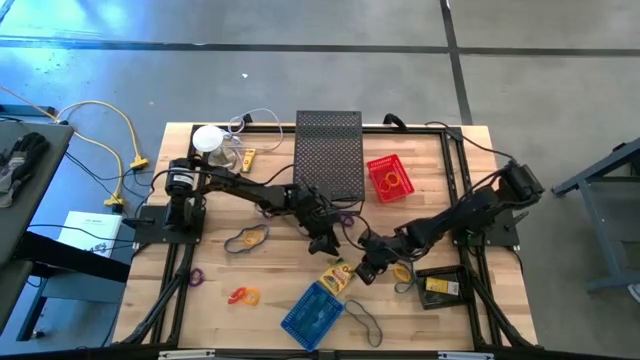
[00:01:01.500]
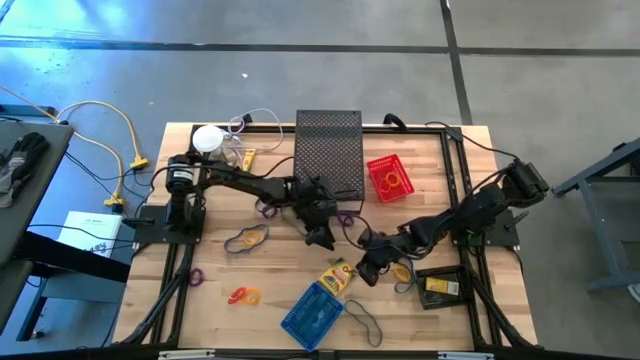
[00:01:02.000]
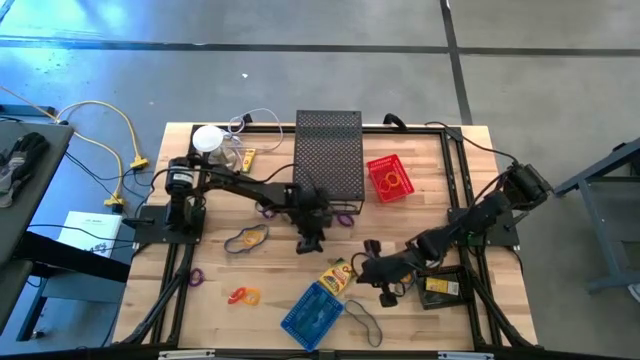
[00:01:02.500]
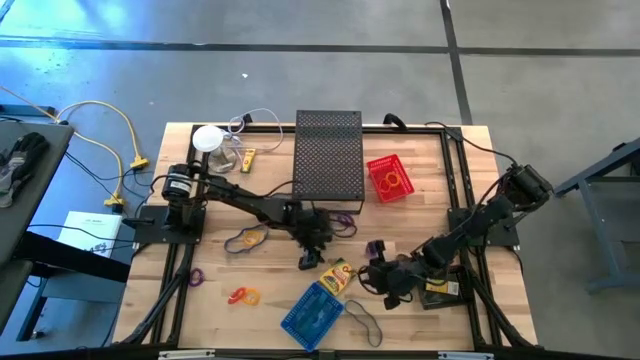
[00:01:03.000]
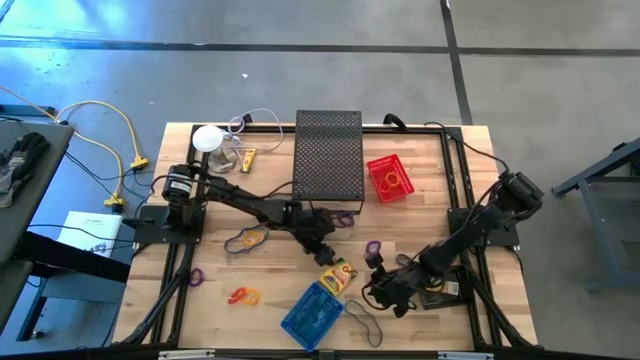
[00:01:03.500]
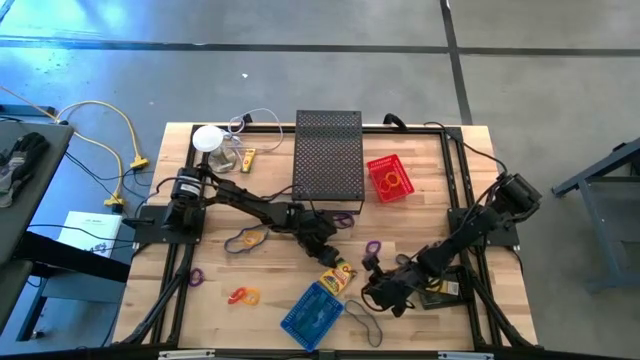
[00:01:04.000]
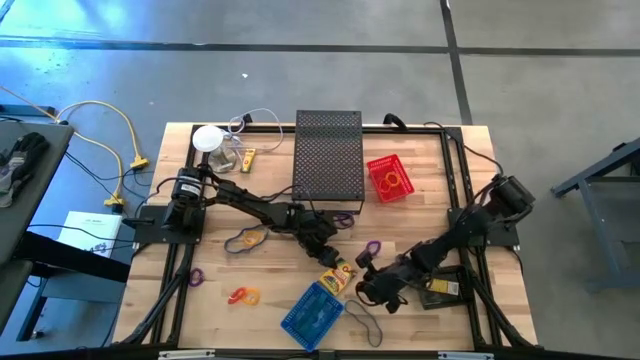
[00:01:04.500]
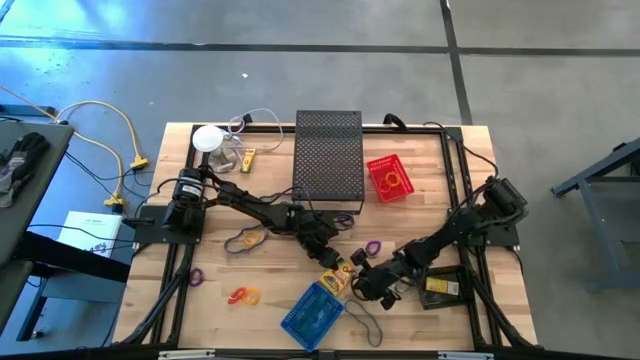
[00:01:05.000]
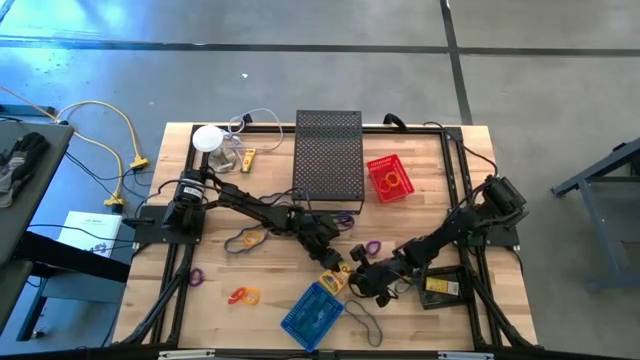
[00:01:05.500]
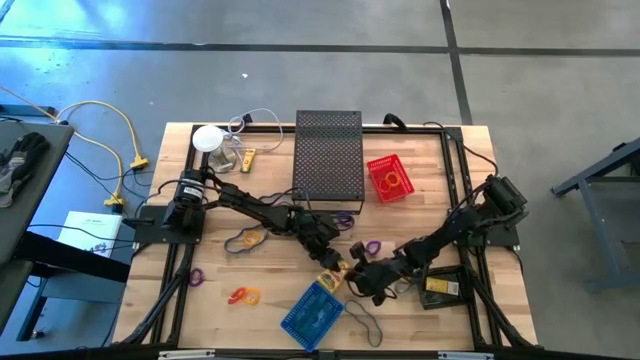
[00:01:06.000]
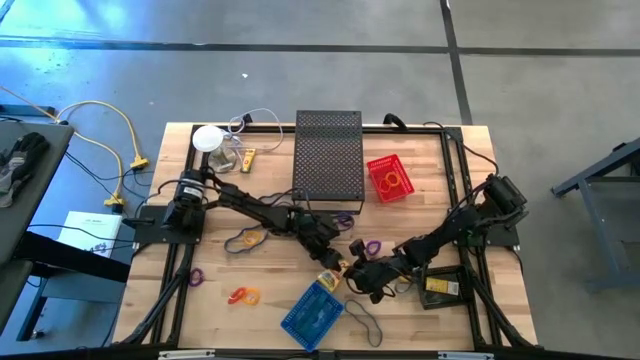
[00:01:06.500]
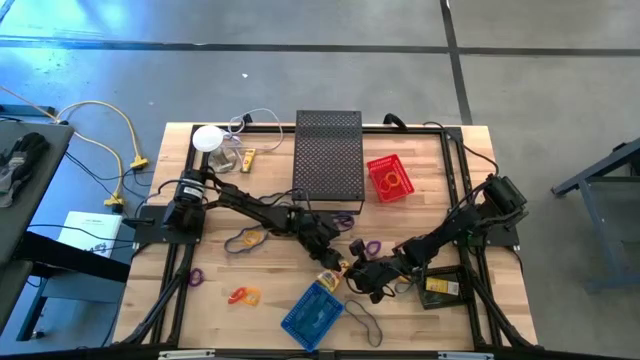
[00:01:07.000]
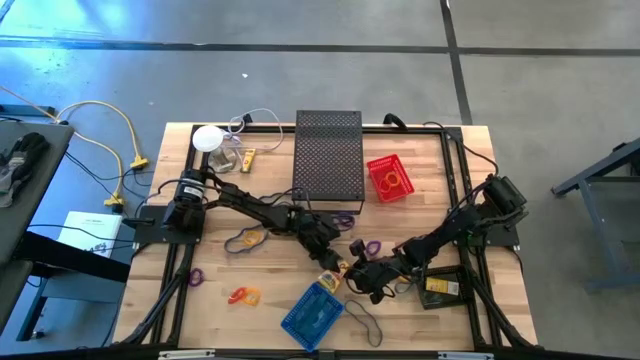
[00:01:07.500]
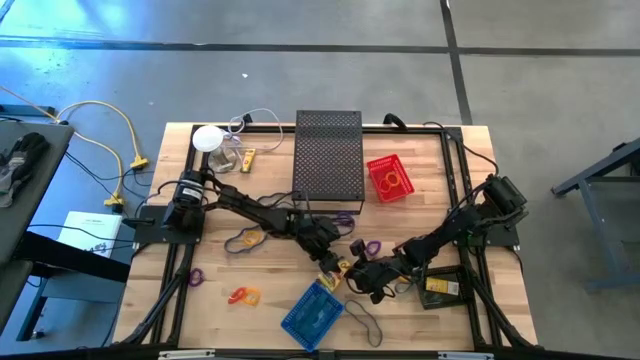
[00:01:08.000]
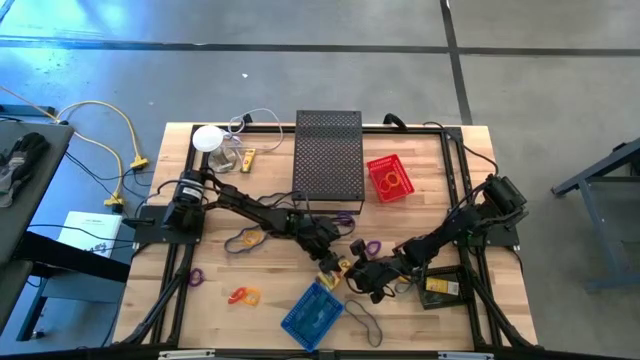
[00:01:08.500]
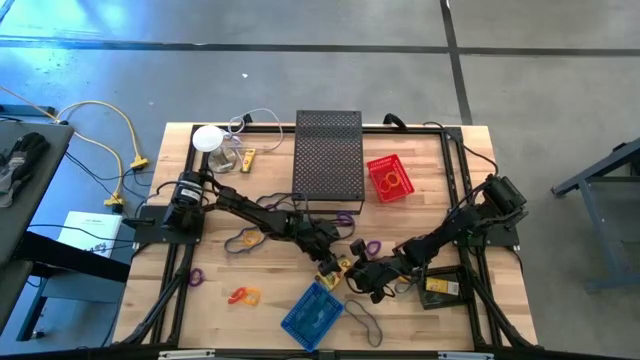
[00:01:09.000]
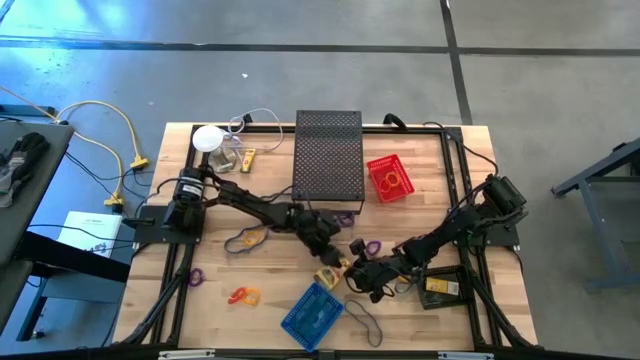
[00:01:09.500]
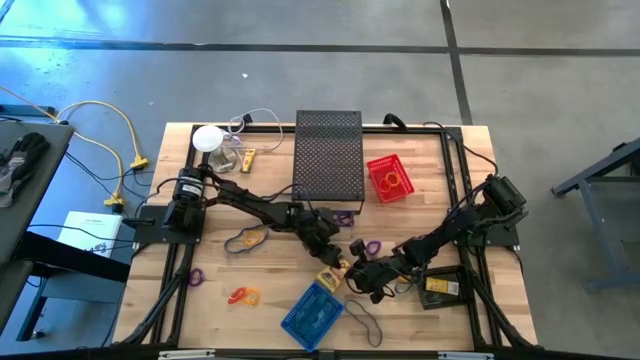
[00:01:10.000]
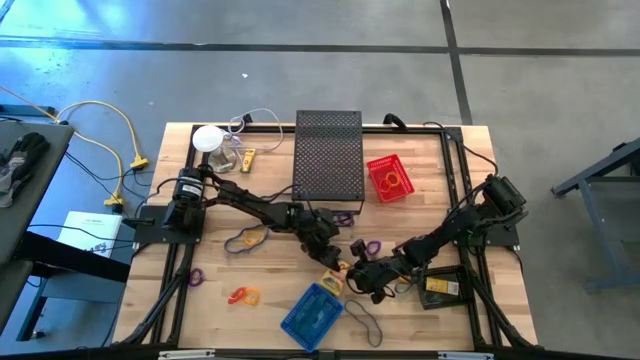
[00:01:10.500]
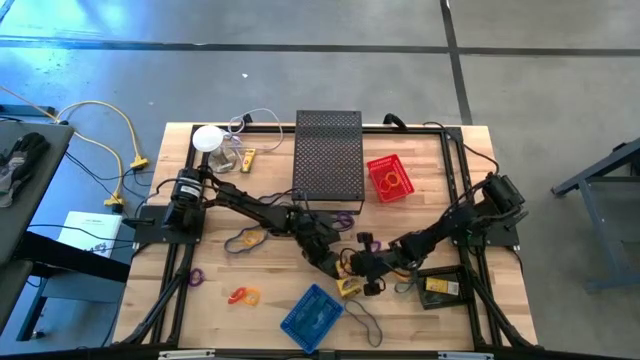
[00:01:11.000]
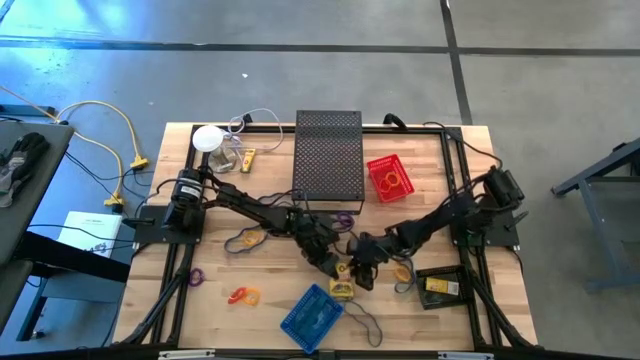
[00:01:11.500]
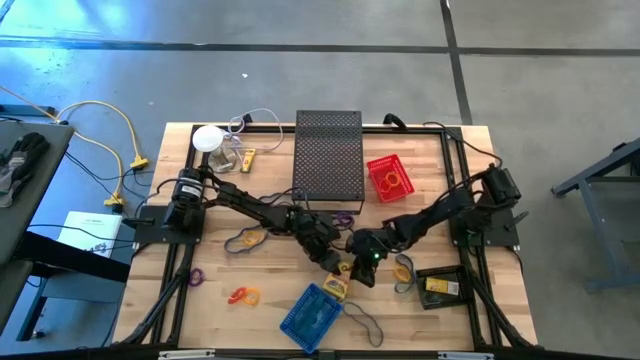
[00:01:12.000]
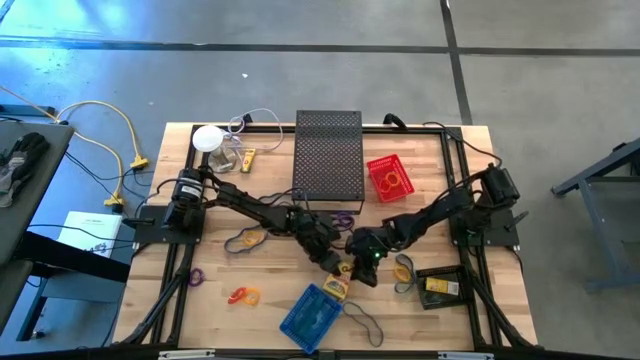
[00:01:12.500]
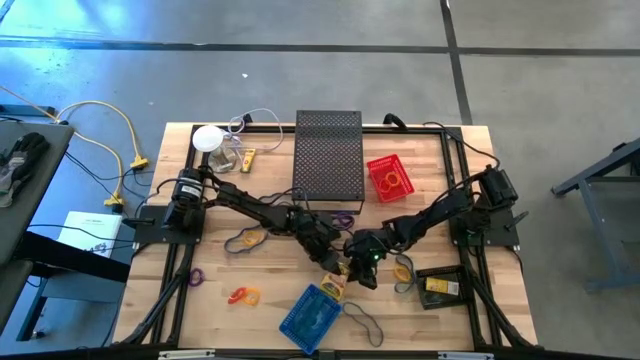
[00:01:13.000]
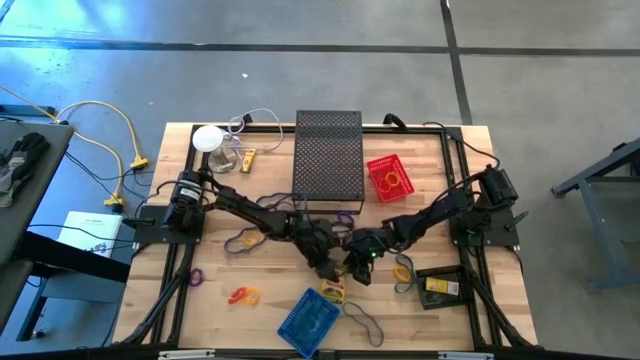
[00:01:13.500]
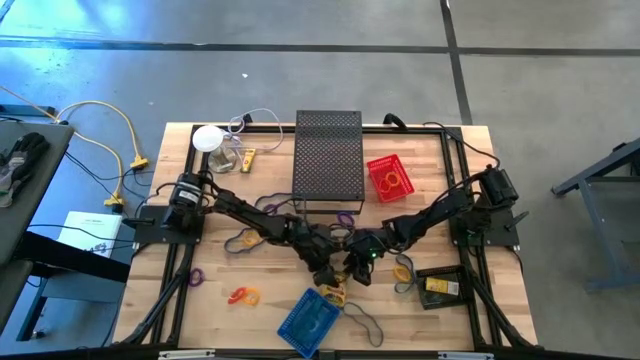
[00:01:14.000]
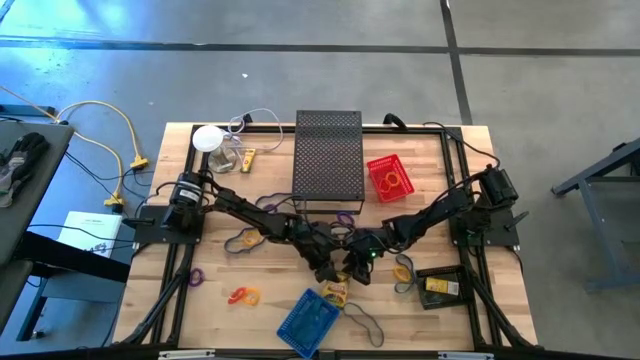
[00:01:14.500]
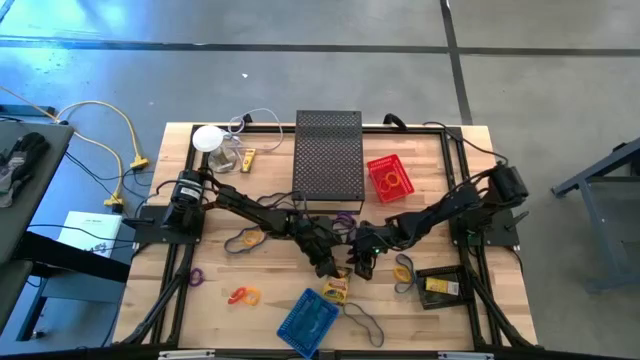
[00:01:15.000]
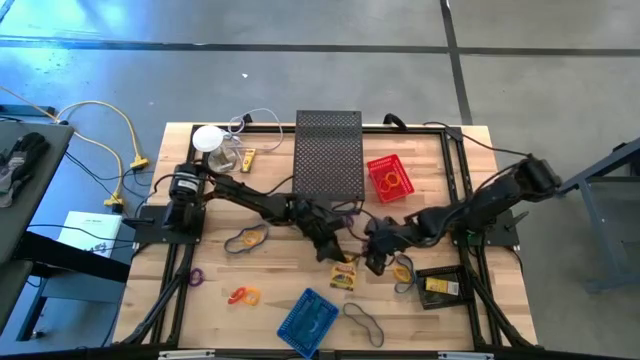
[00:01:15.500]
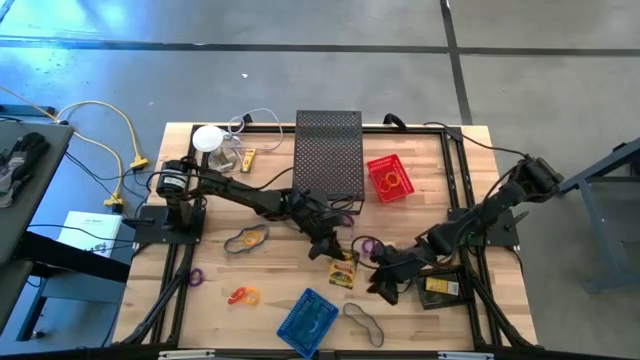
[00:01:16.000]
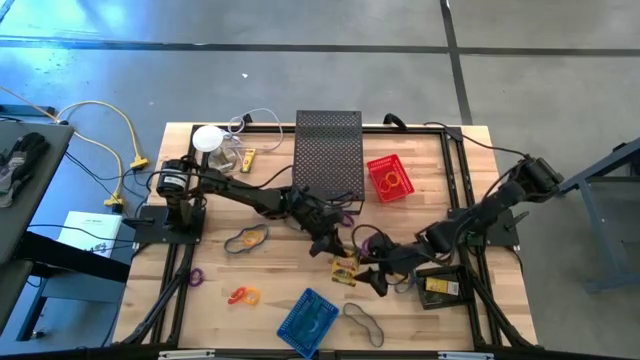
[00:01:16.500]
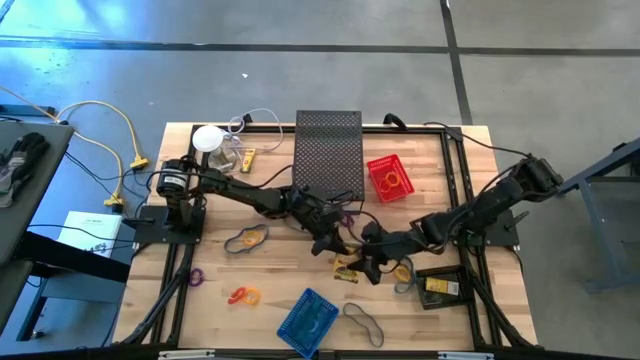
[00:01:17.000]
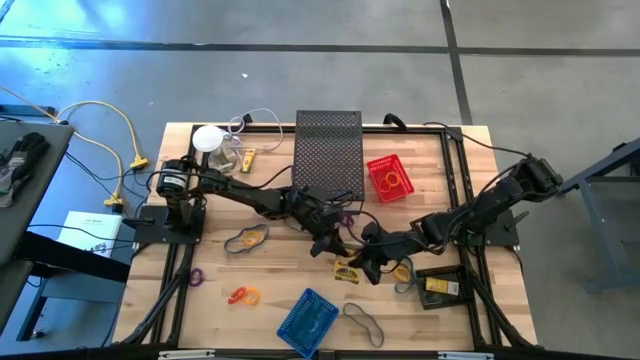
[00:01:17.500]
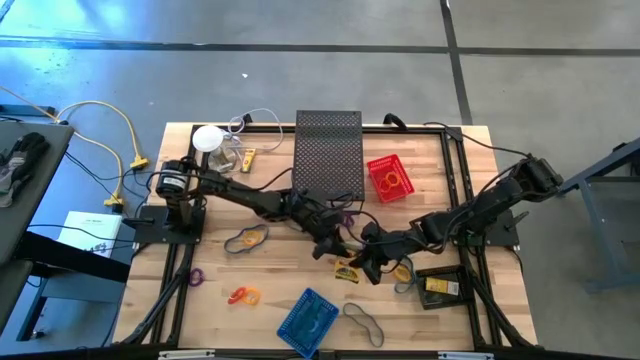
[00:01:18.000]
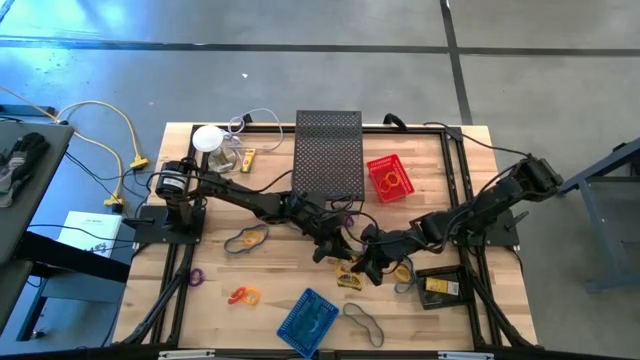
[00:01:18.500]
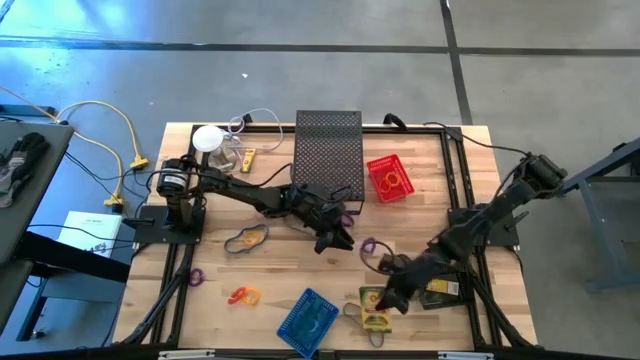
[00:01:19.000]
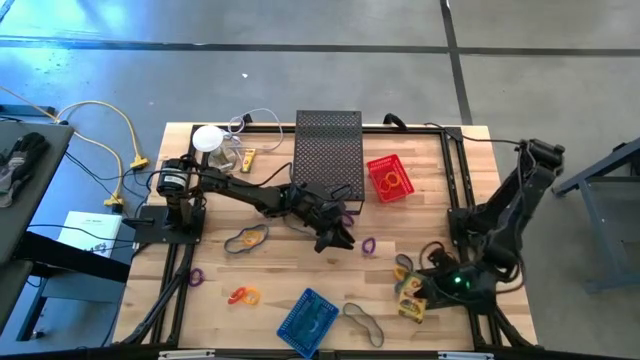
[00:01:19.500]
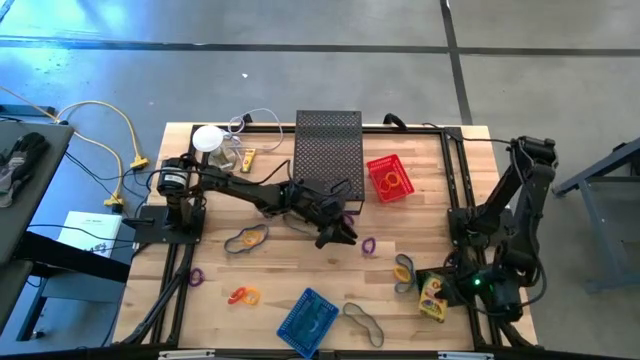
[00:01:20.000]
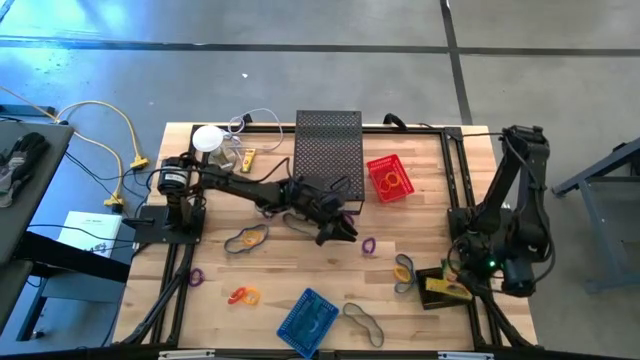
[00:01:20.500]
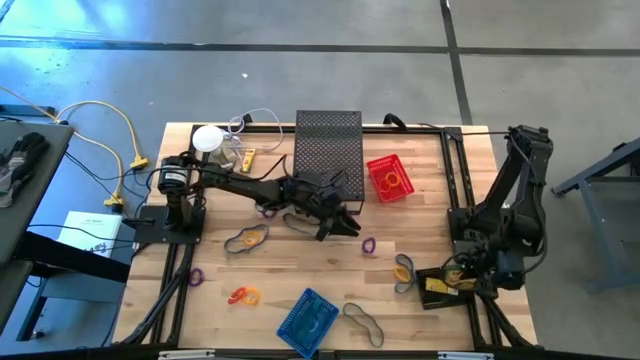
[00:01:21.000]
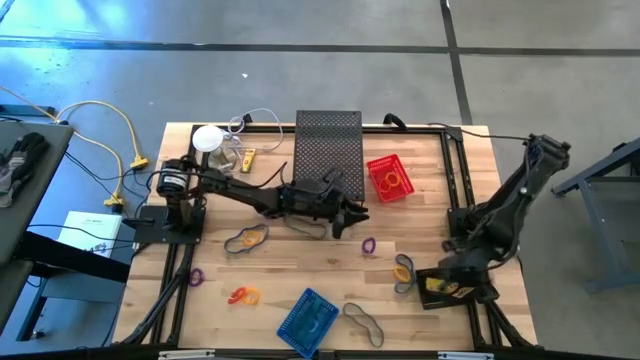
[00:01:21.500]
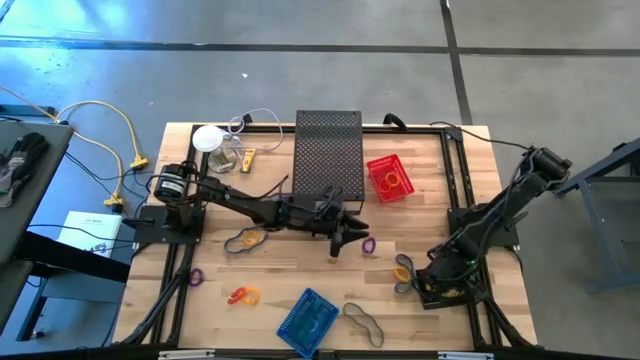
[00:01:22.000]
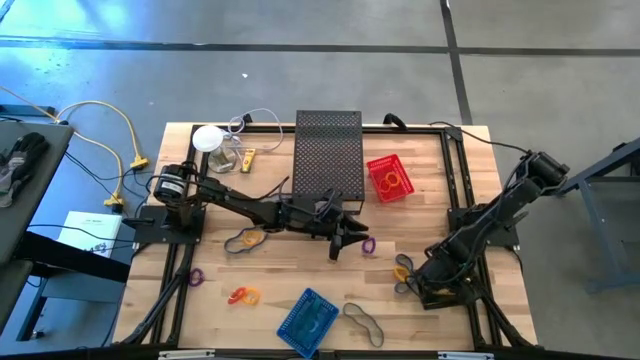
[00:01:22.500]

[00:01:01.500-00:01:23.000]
Task: Pick & Place Office Desk Supplies
Put the crayon box into the black bin
